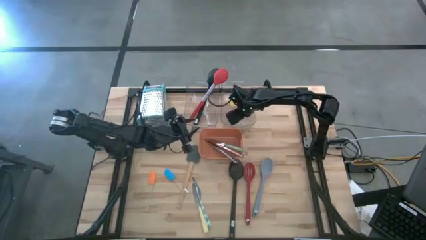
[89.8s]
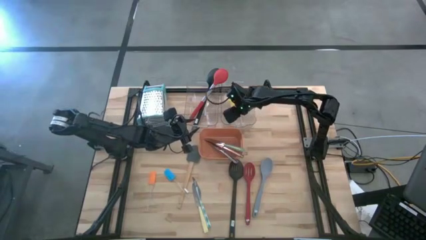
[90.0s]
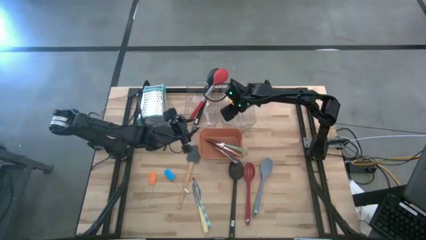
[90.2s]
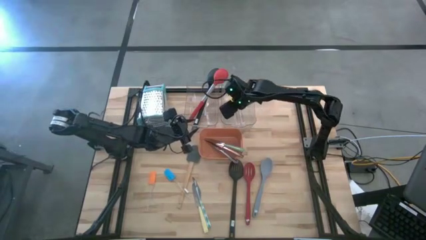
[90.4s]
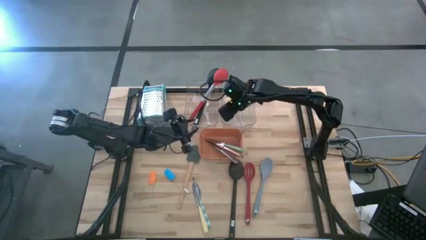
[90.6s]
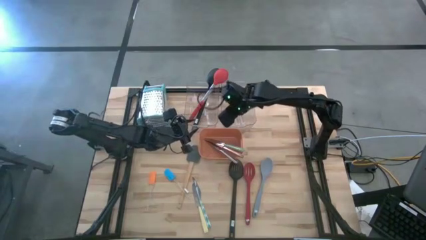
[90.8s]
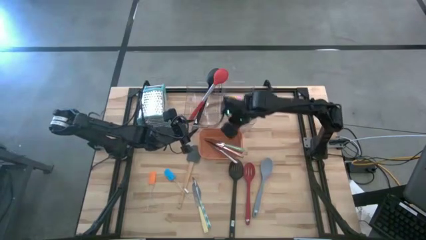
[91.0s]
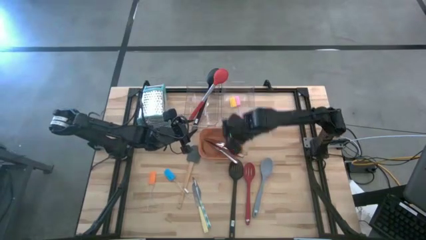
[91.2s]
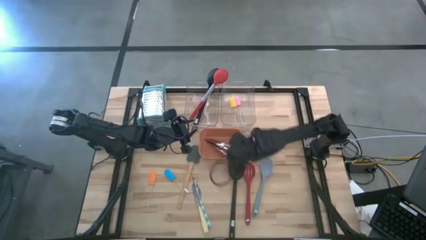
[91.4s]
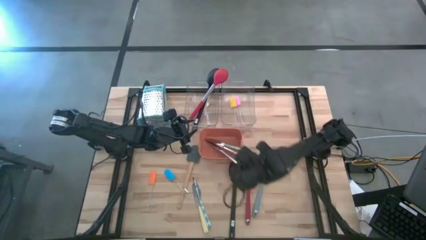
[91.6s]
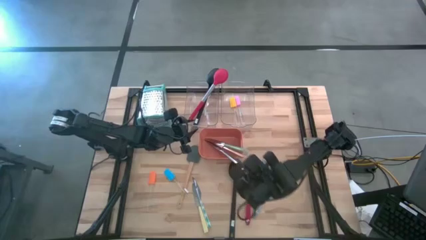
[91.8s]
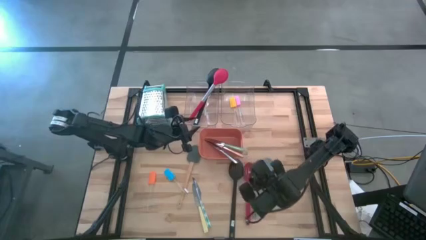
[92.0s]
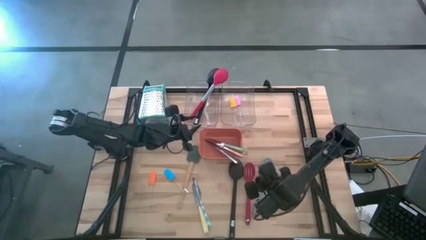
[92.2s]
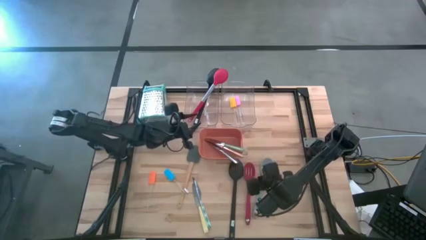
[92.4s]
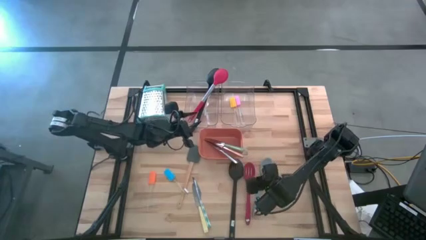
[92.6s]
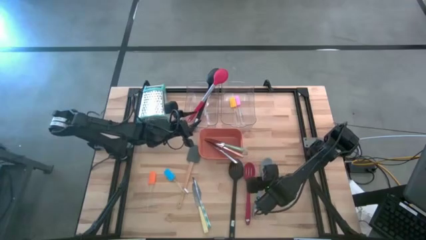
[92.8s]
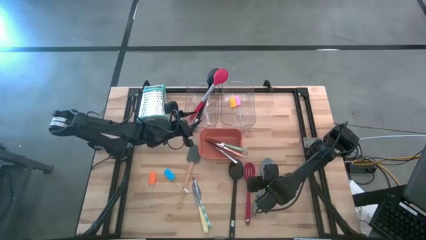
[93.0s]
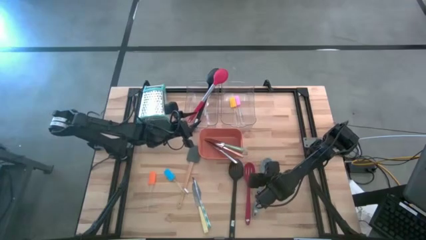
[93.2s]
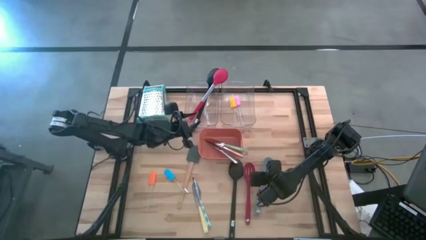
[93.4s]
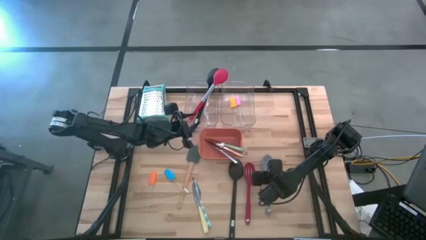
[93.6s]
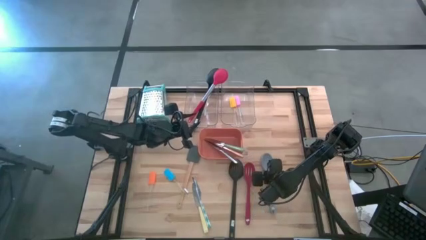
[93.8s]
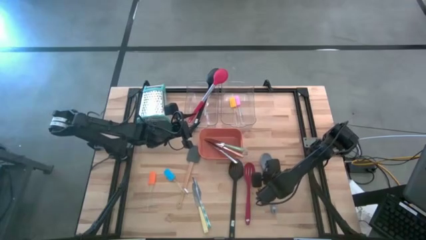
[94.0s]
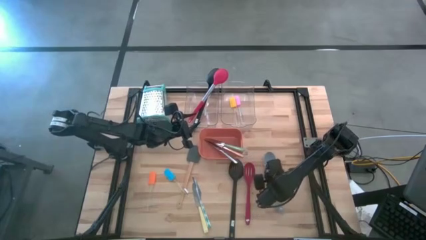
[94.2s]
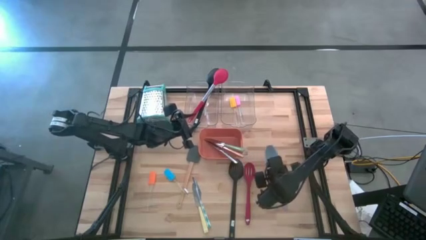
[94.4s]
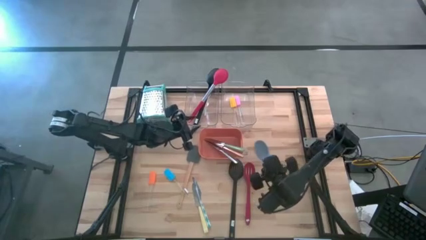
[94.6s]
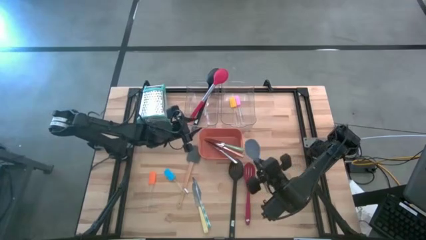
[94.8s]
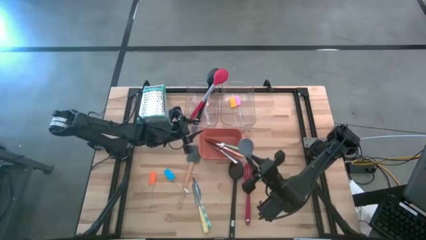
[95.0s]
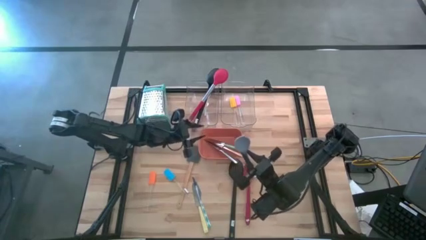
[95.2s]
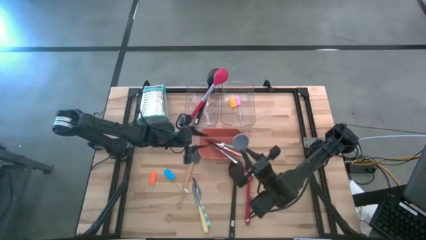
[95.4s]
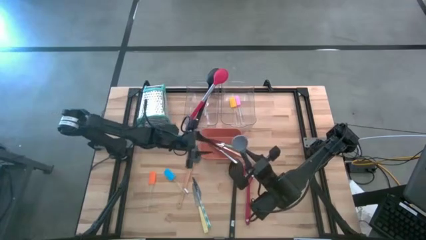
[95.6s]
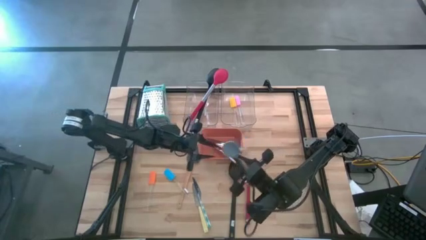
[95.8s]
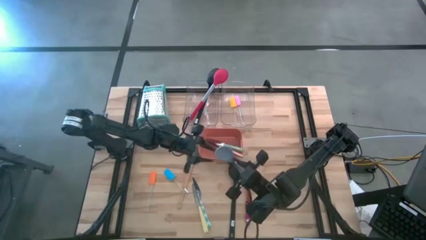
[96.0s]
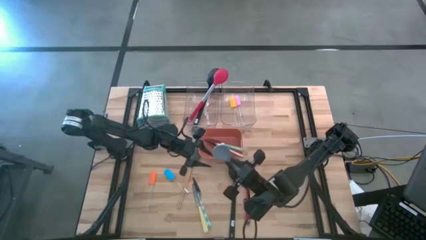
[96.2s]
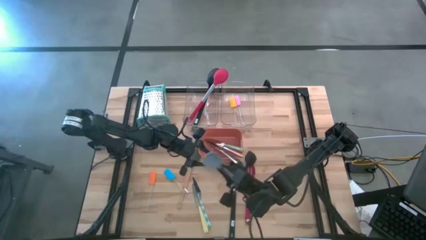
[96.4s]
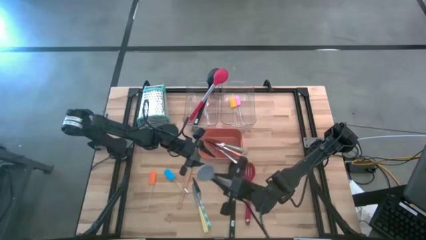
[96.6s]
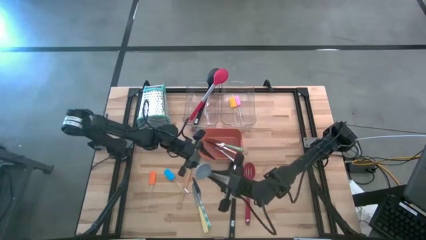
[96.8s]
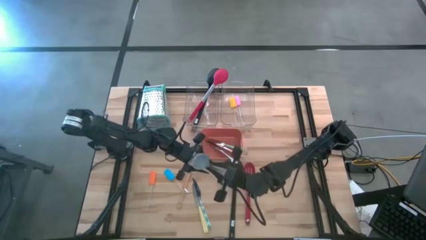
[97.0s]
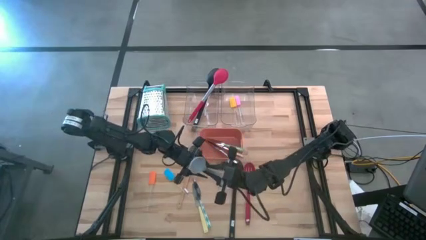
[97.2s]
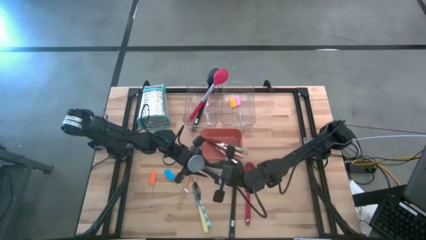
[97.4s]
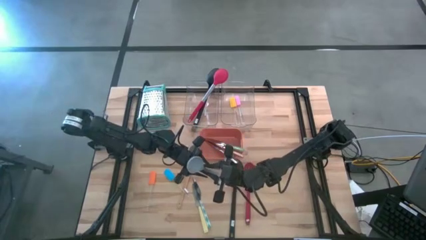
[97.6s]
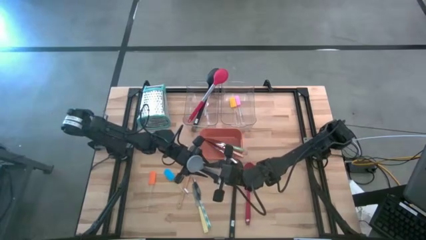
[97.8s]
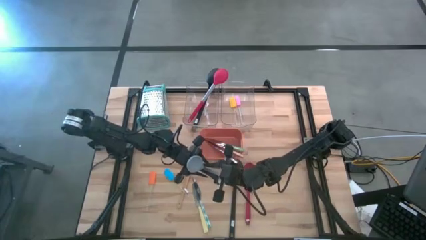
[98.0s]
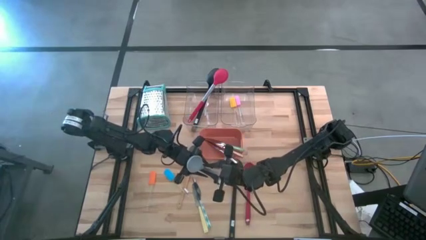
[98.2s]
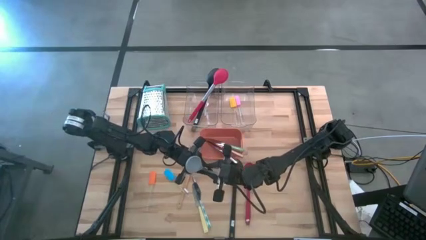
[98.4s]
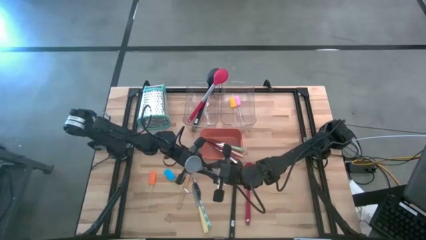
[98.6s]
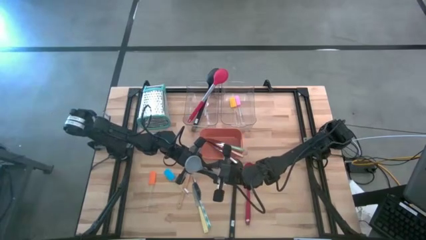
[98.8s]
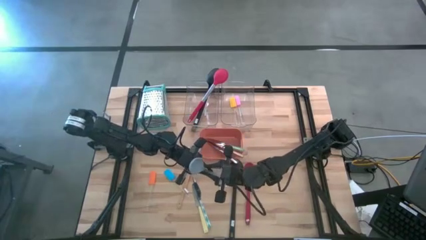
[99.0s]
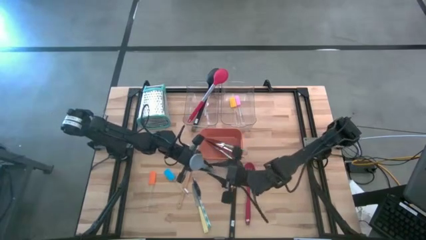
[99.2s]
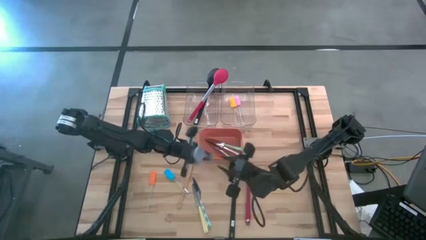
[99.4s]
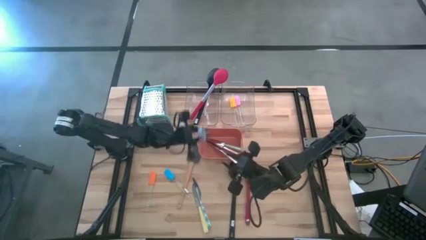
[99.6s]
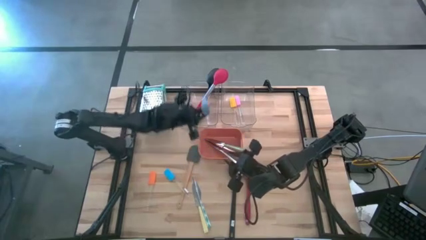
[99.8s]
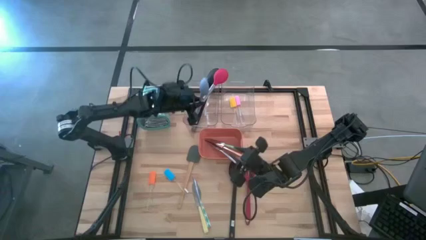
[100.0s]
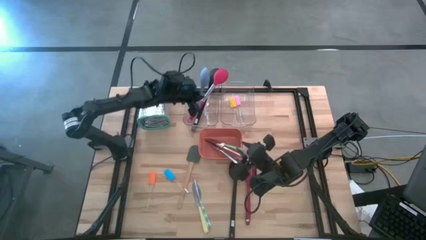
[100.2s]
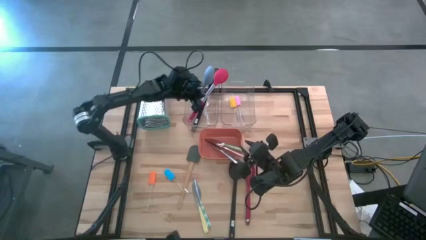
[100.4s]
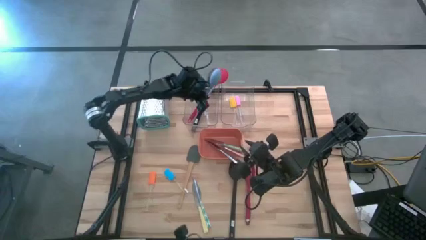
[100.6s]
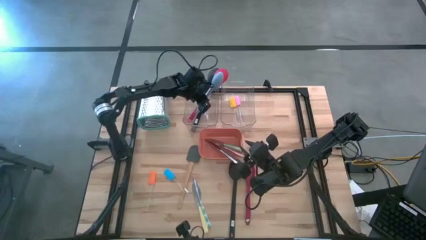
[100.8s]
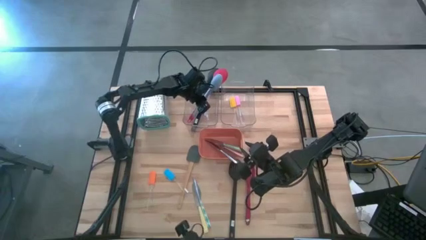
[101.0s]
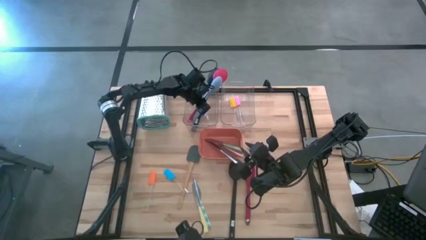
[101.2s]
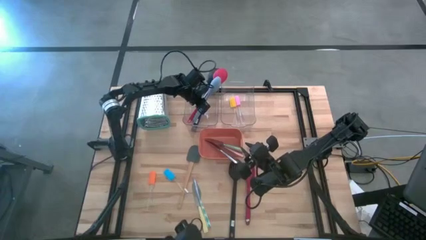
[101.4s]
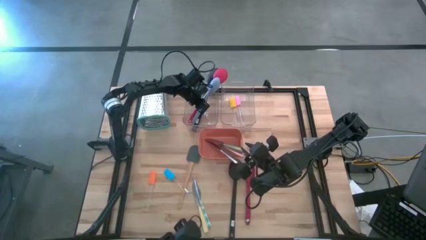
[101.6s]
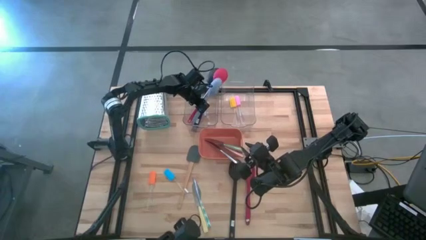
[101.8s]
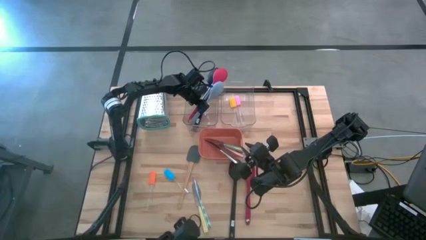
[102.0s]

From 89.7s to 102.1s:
Task: Pick & Place Kitchen Items
Put the blue serving spoon into the left transparent bin

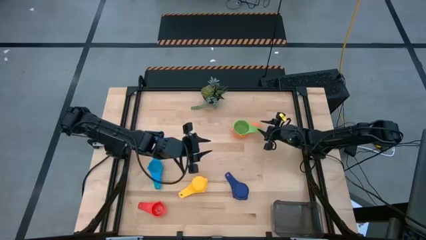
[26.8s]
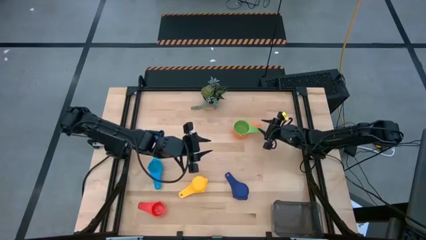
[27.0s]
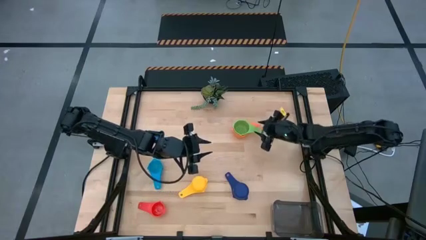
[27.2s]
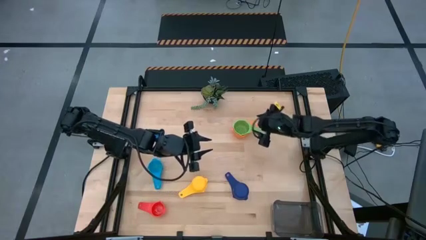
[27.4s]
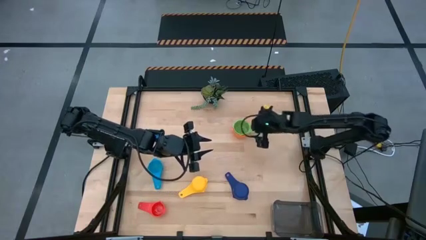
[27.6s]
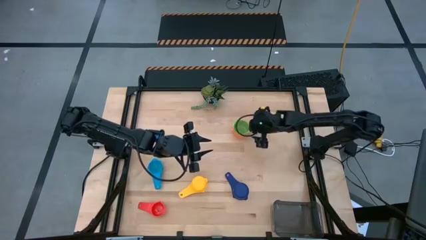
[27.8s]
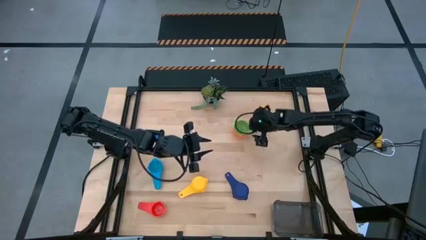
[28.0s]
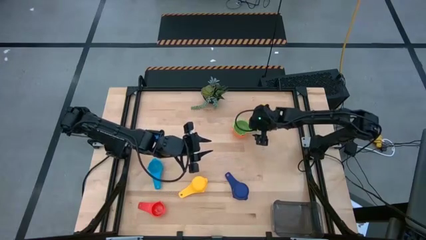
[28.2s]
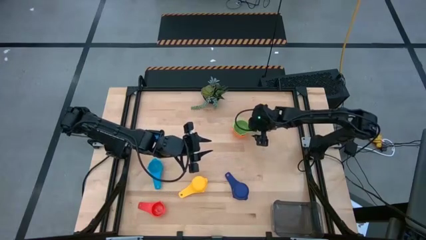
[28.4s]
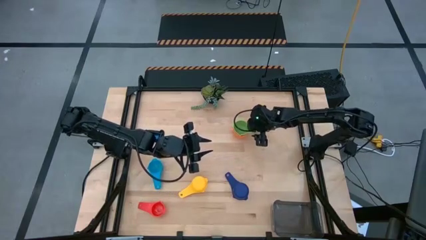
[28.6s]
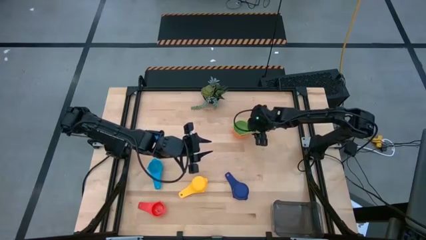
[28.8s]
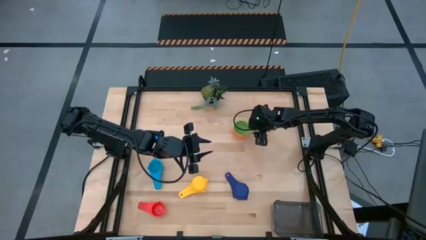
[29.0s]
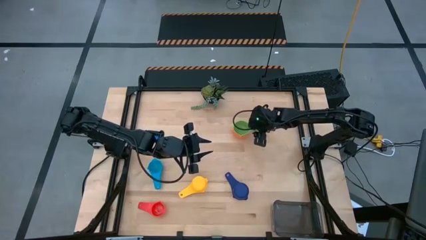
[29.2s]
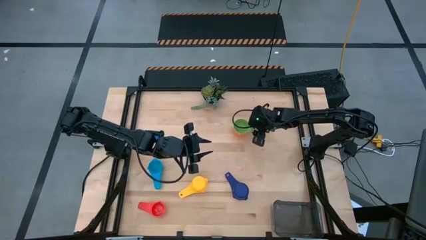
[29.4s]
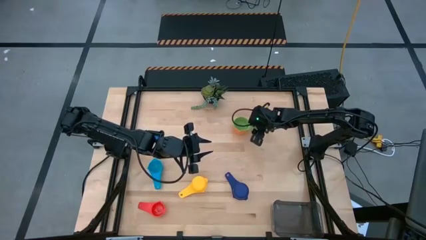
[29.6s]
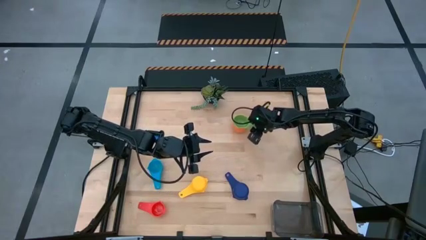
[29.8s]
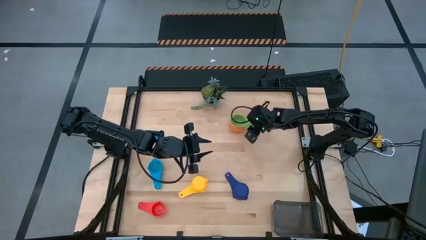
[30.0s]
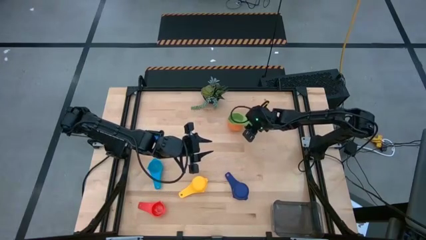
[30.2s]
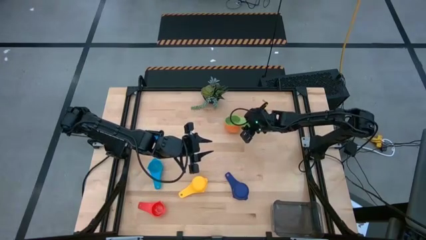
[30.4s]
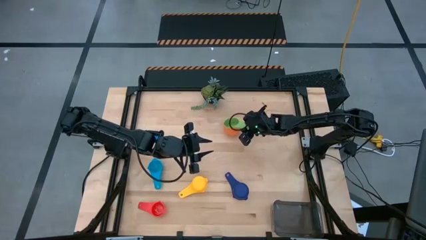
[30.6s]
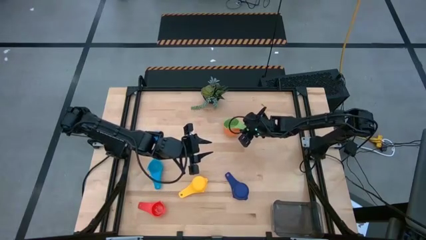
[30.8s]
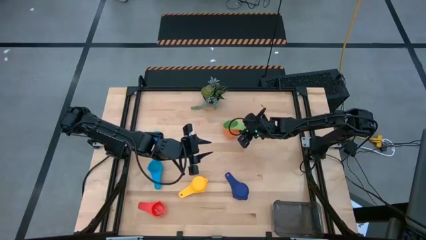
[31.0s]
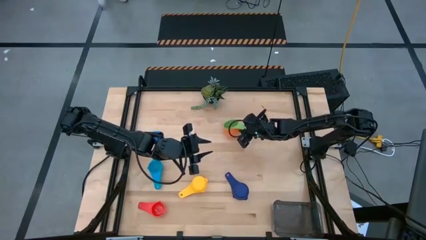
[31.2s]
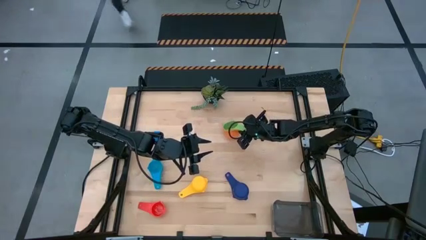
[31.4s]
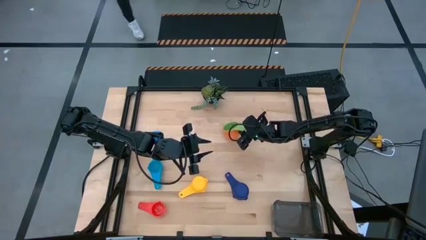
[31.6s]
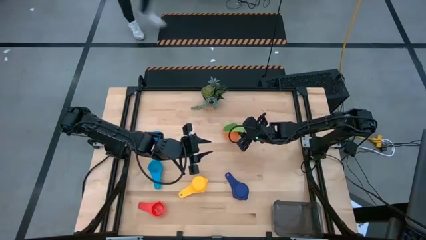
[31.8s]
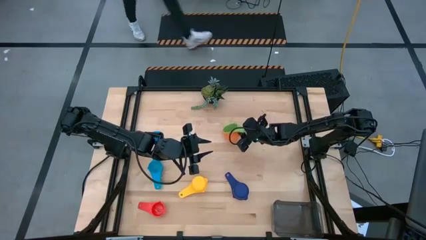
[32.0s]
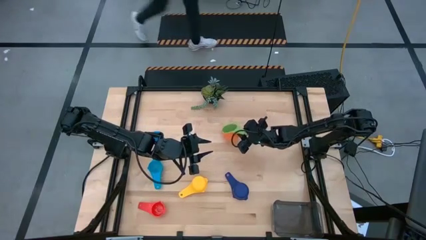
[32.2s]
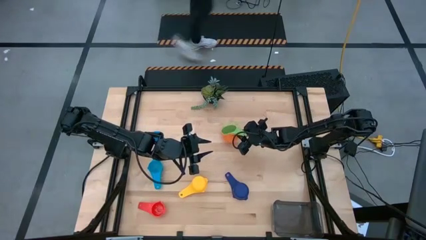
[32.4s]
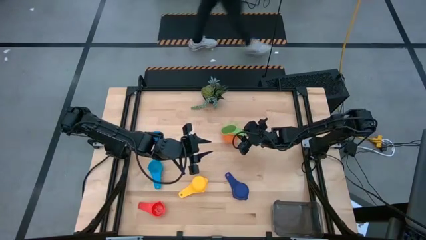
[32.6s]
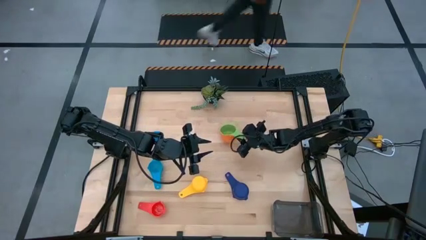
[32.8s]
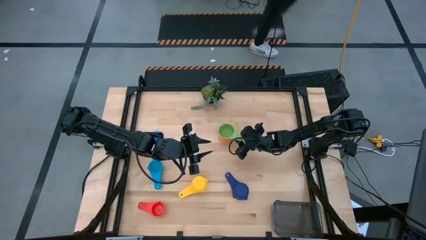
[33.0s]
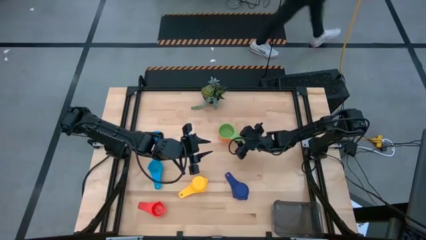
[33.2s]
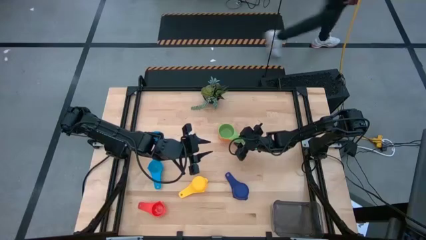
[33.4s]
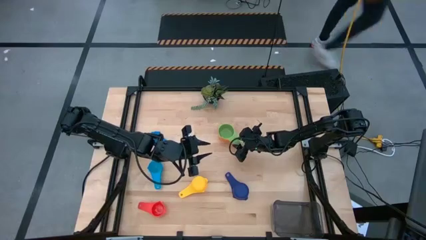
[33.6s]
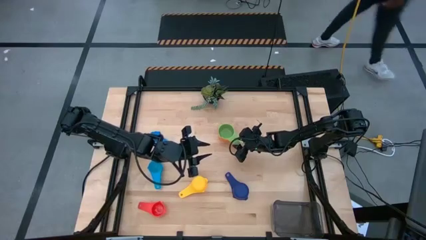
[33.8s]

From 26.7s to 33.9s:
Task: Nest measuring cups in basket
Adjust the stacked measuring cups
